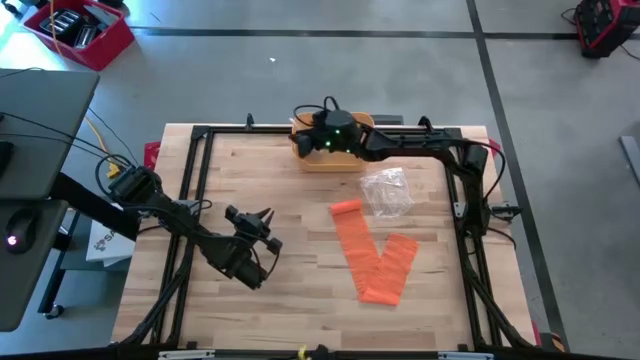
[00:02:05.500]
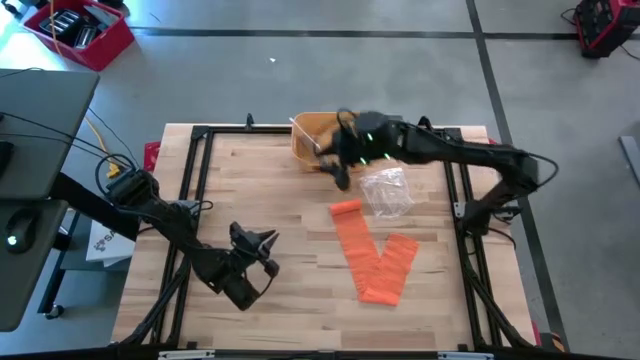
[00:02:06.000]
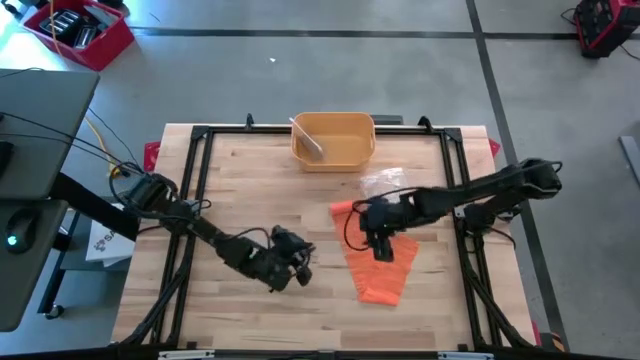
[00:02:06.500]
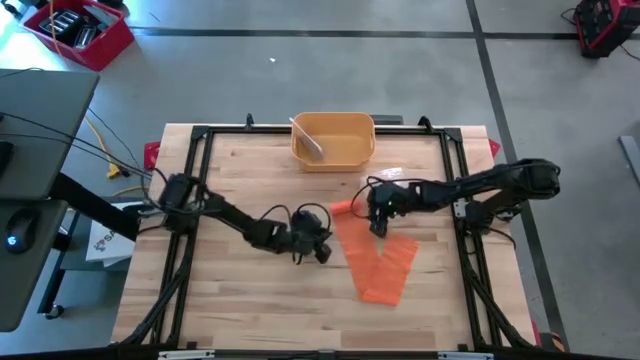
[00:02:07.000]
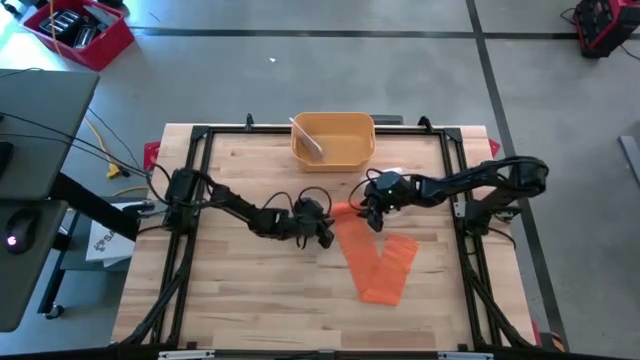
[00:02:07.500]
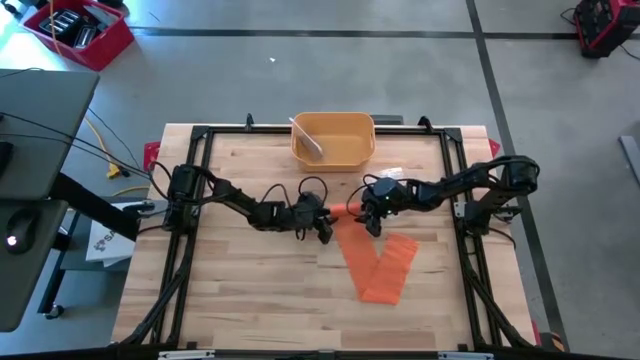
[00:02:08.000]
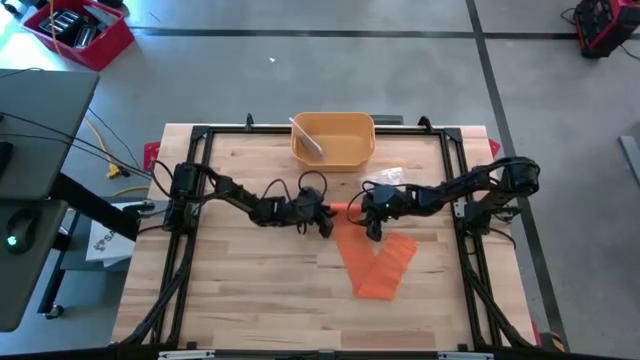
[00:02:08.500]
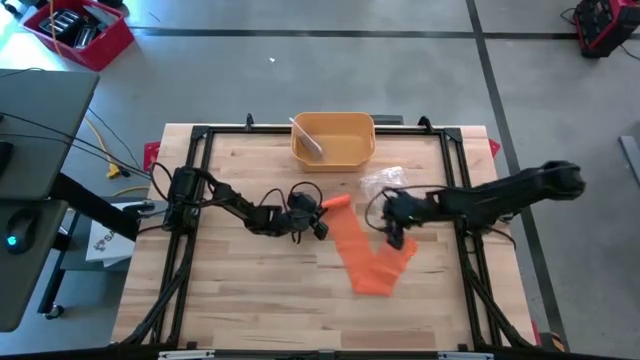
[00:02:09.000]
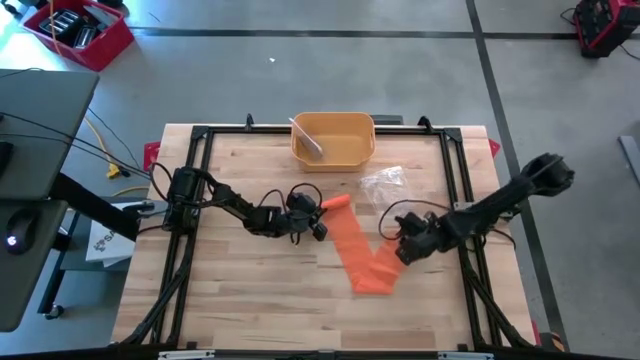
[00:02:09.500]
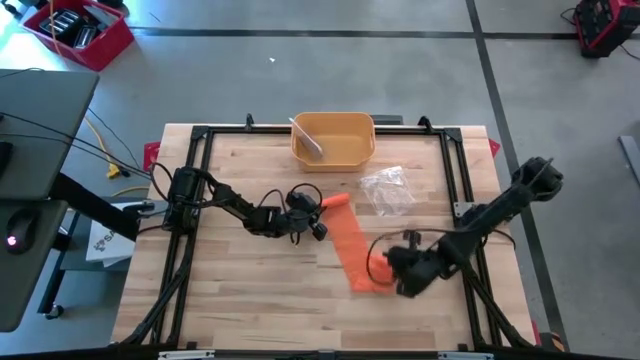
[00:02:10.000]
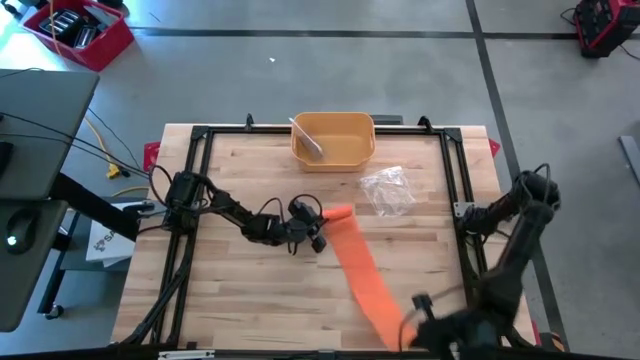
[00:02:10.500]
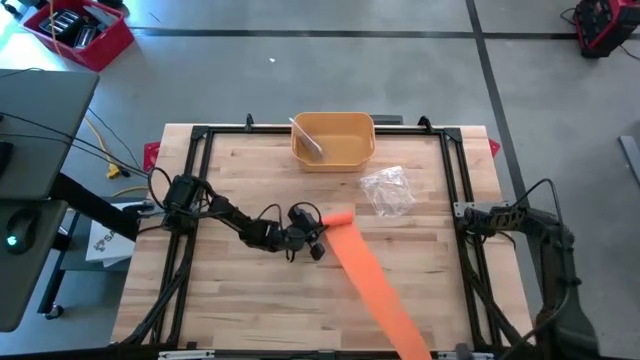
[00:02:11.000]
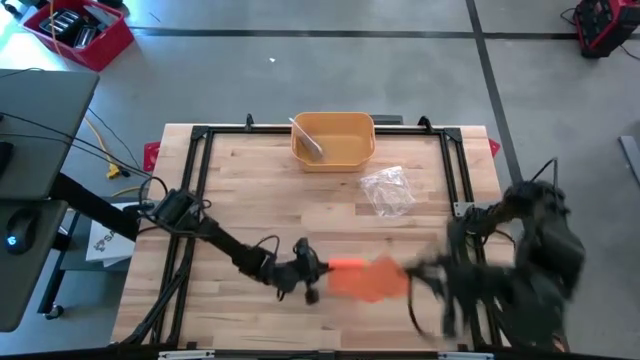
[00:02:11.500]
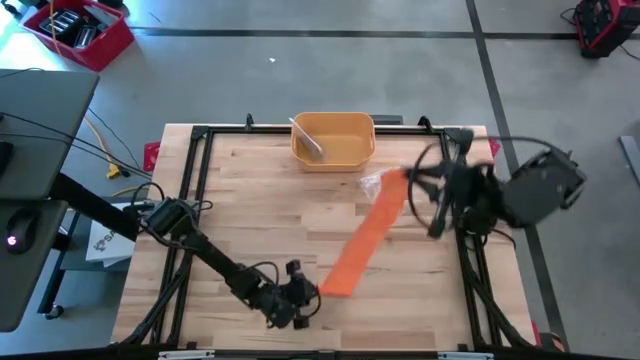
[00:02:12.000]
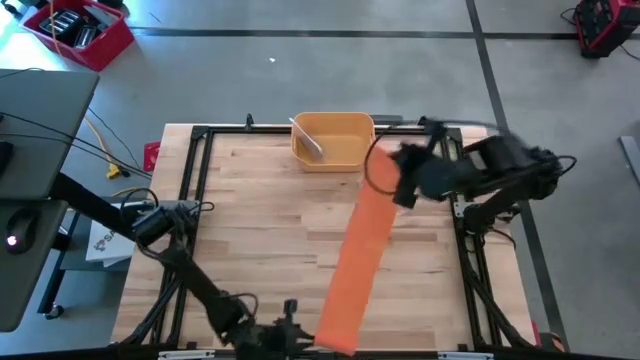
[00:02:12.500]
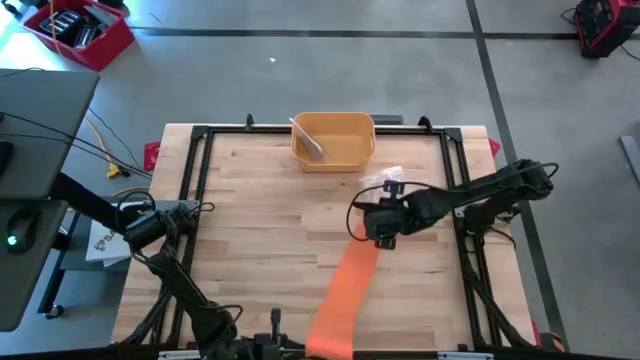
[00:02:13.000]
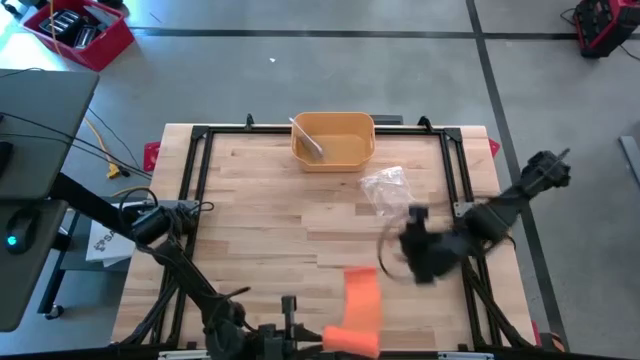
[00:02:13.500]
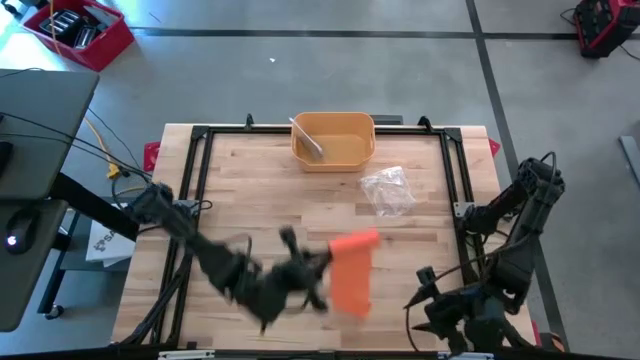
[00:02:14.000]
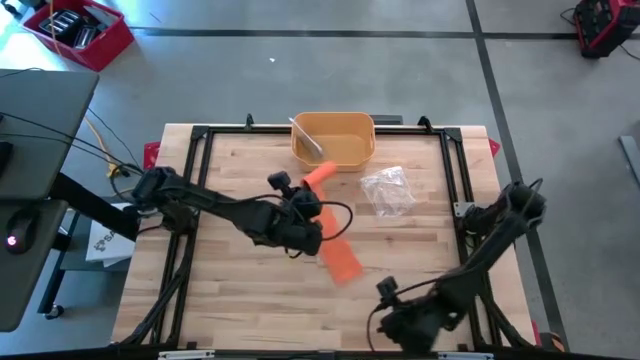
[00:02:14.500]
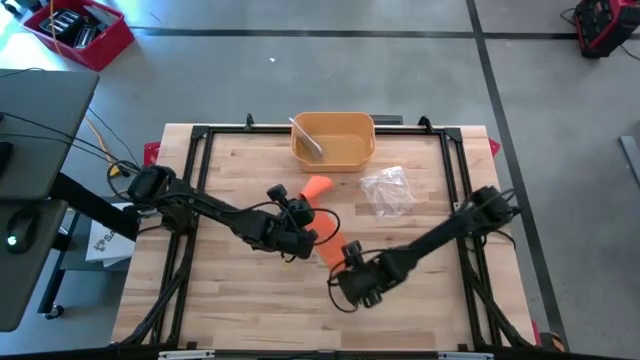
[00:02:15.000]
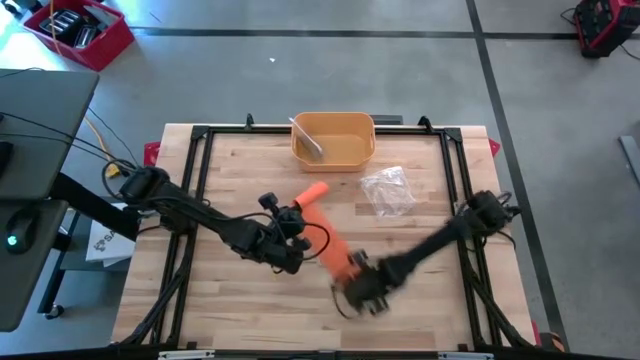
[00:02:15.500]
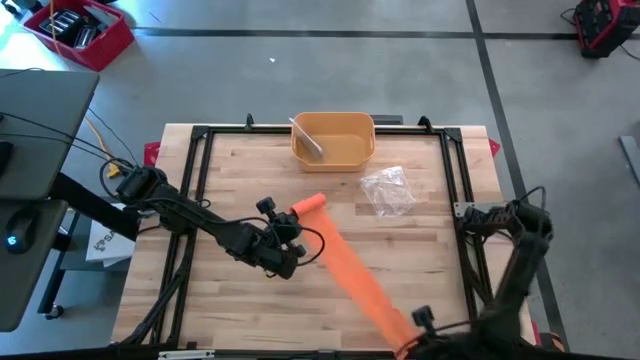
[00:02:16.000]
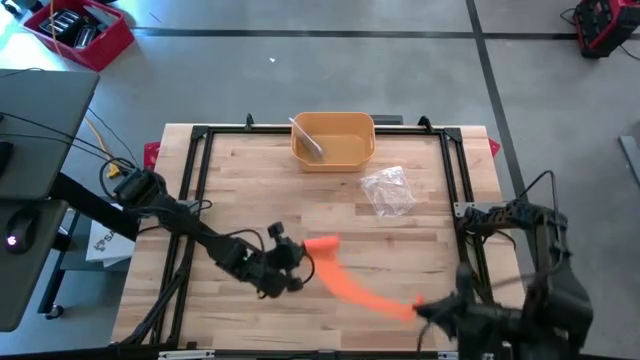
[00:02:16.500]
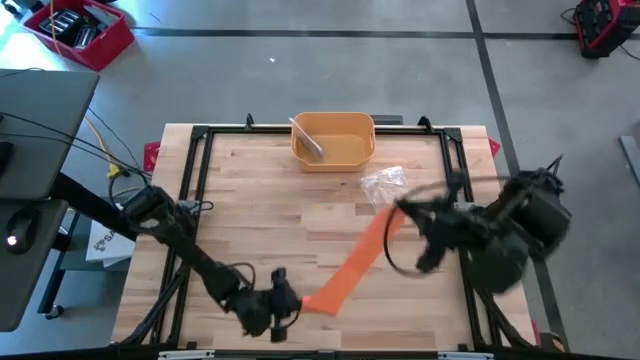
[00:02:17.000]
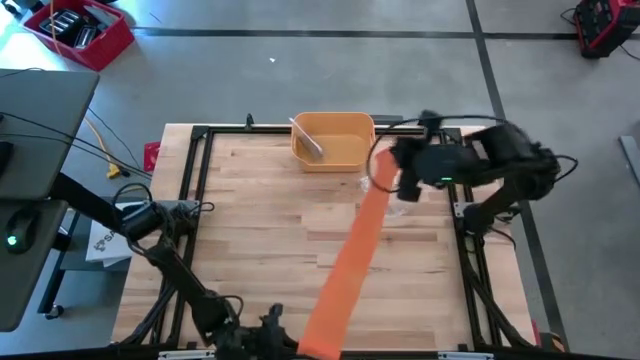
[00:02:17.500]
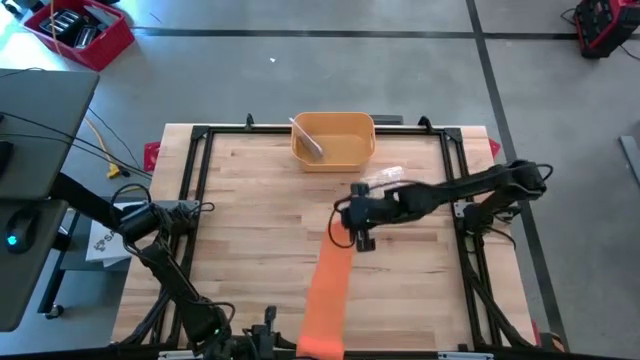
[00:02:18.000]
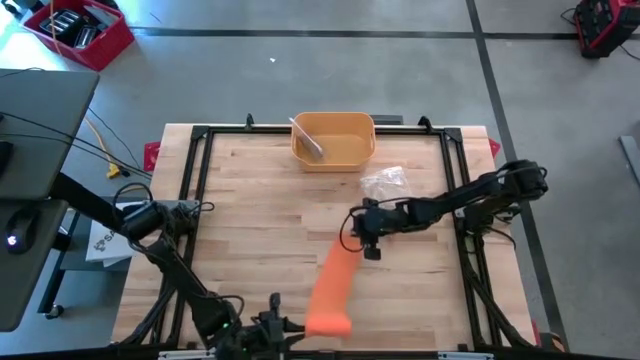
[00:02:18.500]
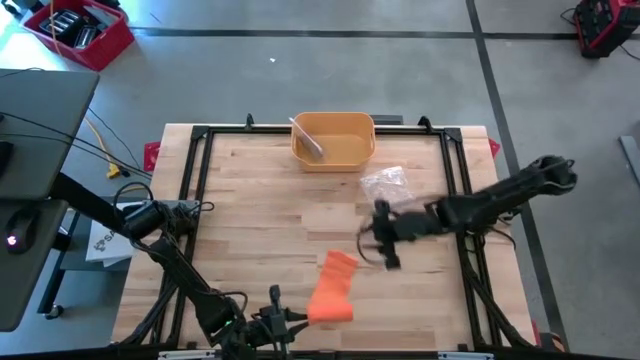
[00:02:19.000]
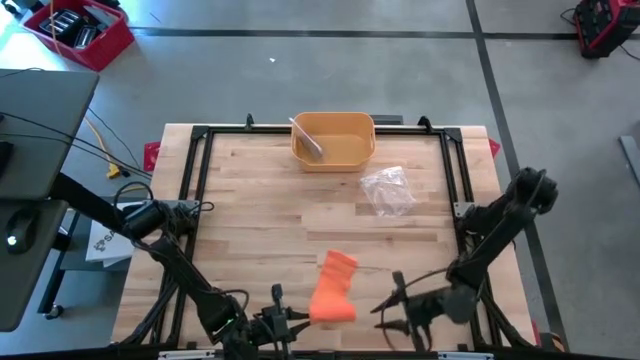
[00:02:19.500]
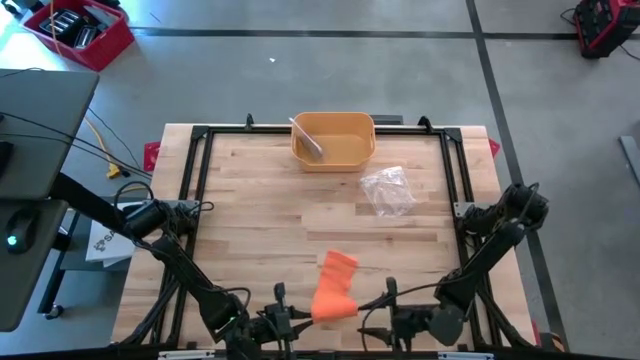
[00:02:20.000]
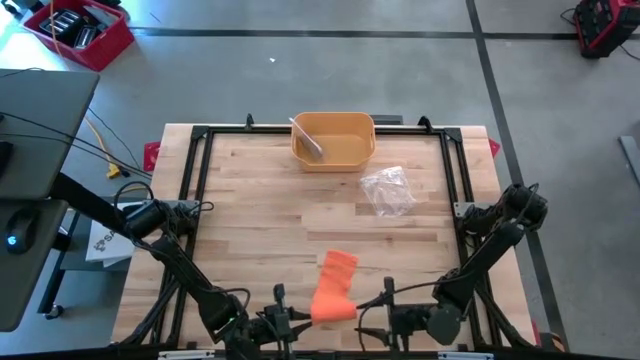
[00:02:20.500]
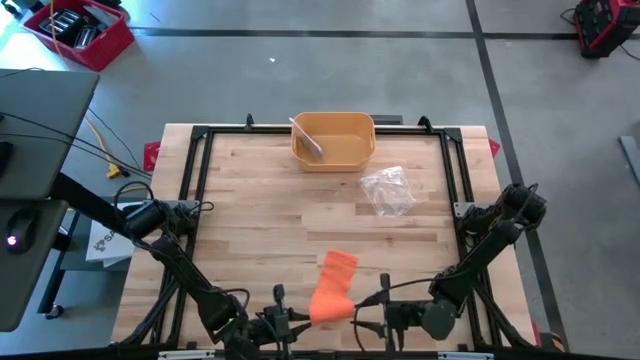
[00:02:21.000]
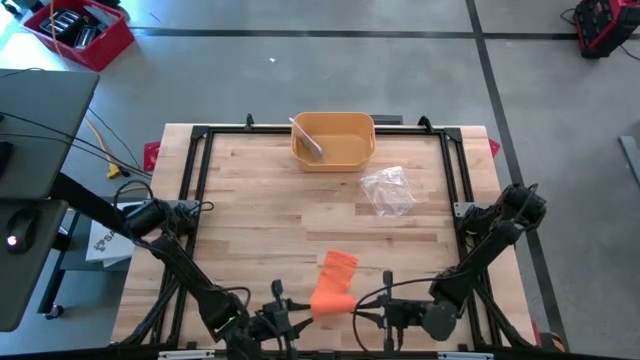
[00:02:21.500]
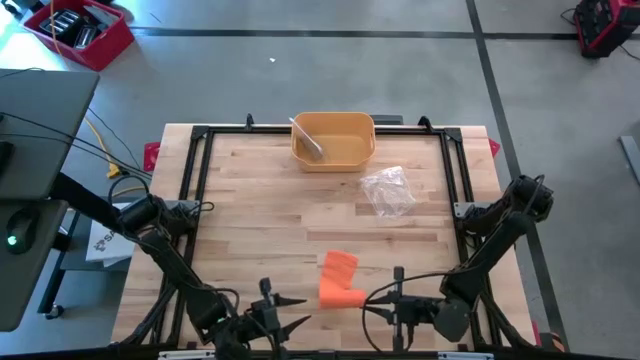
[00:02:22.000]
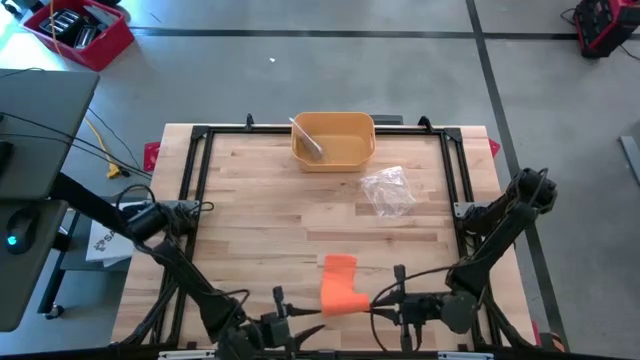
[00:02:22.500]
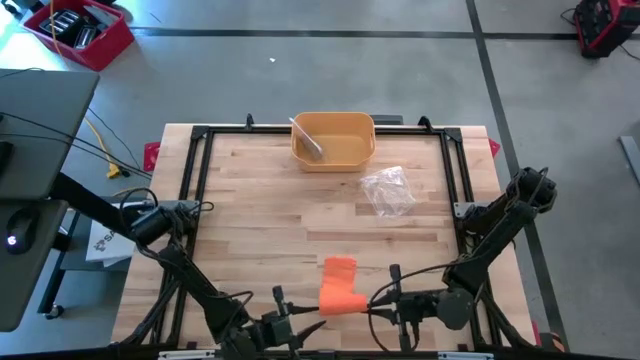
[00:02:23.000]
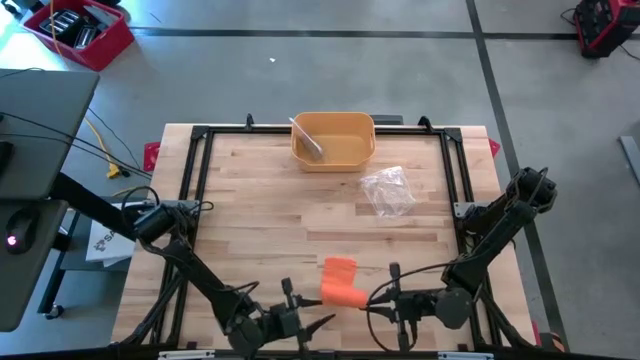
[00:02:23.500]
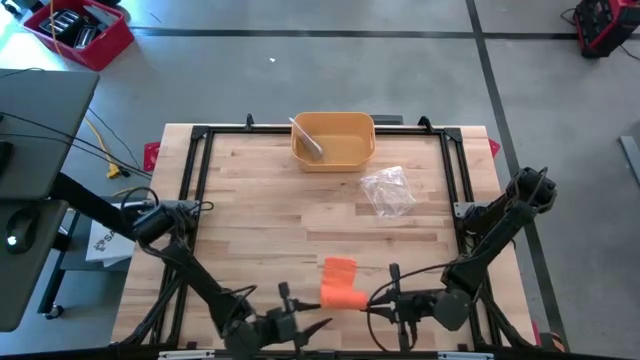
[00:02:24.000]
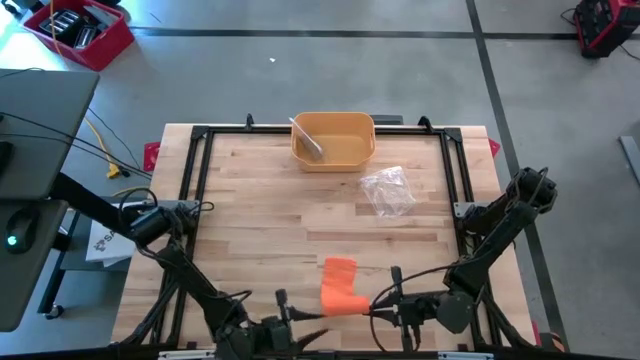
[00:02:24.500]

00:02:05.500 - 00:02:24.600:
Task: Roll bandage
Roll the orange bandage
